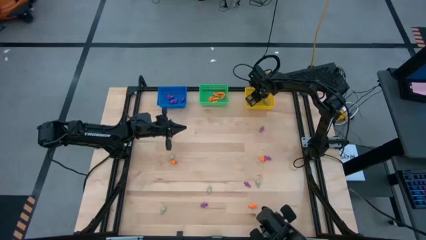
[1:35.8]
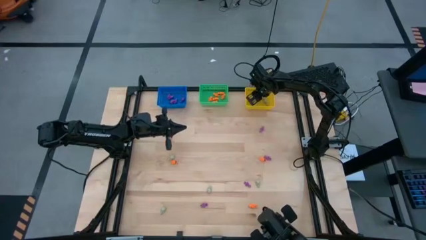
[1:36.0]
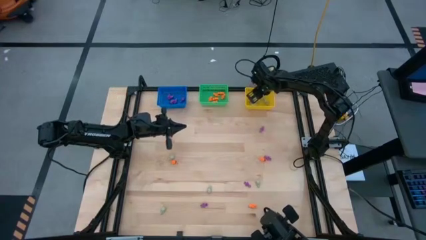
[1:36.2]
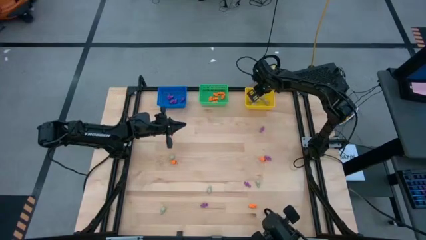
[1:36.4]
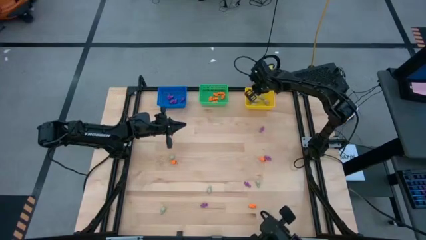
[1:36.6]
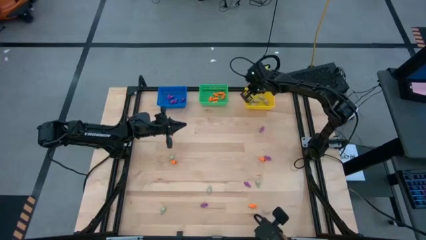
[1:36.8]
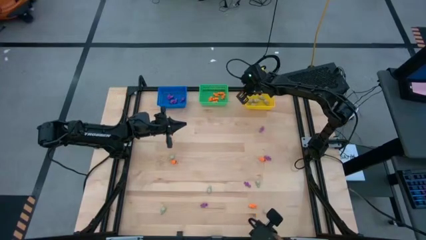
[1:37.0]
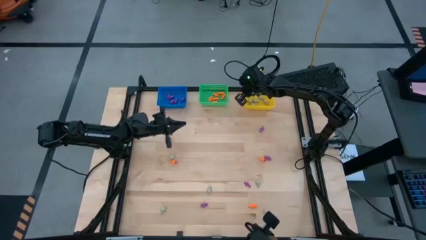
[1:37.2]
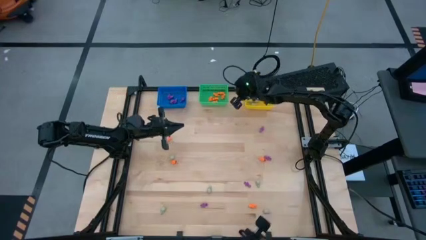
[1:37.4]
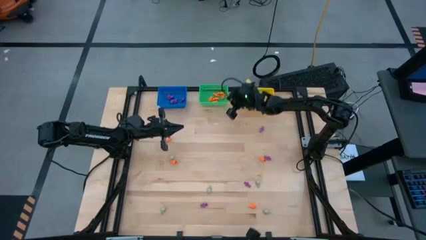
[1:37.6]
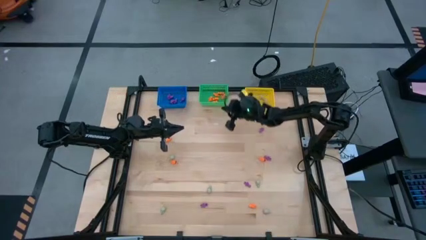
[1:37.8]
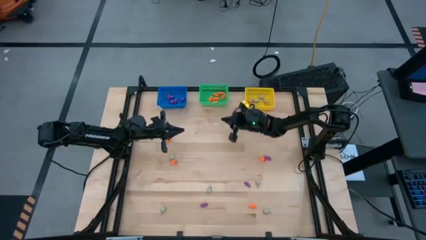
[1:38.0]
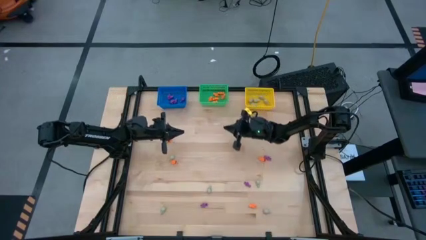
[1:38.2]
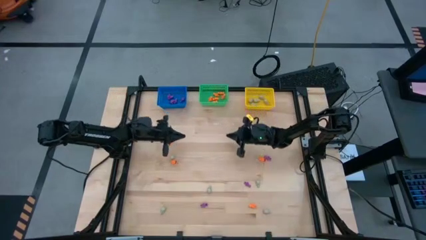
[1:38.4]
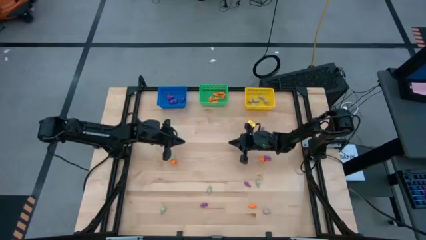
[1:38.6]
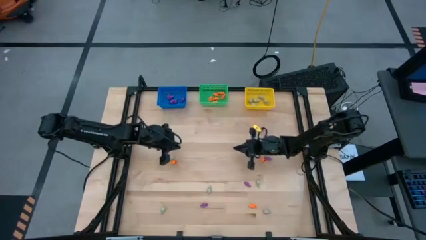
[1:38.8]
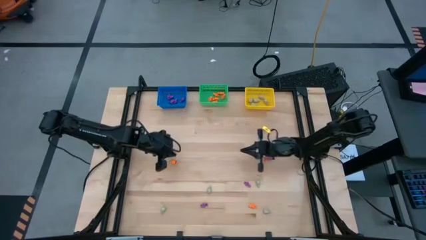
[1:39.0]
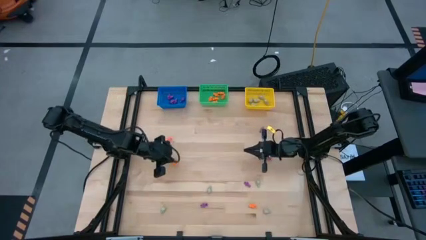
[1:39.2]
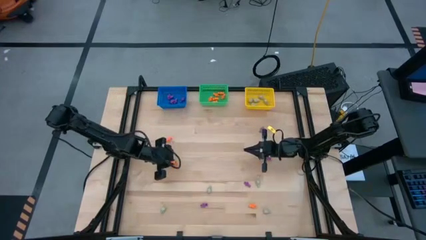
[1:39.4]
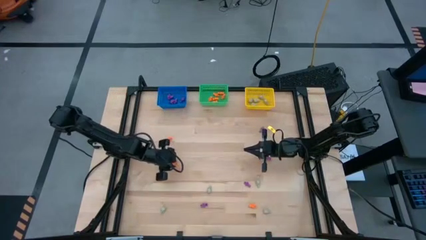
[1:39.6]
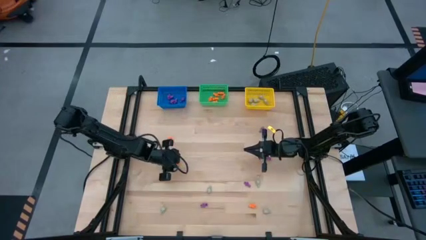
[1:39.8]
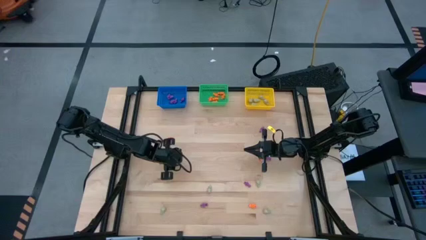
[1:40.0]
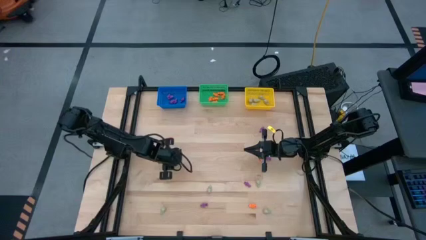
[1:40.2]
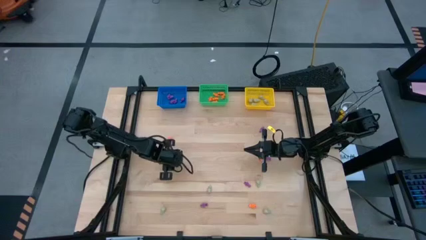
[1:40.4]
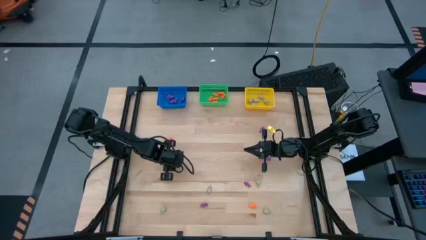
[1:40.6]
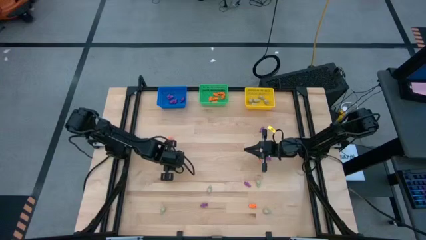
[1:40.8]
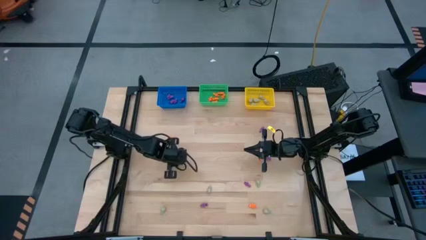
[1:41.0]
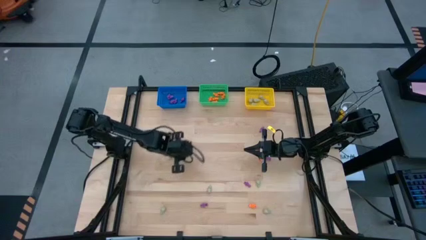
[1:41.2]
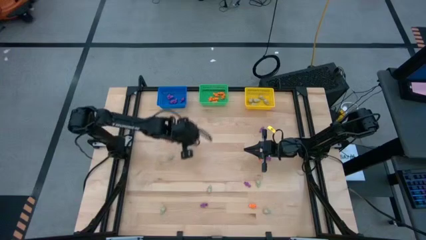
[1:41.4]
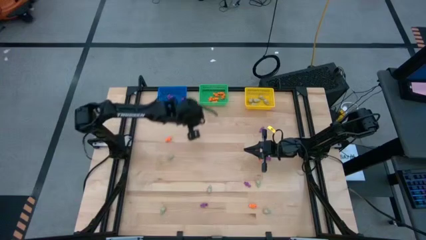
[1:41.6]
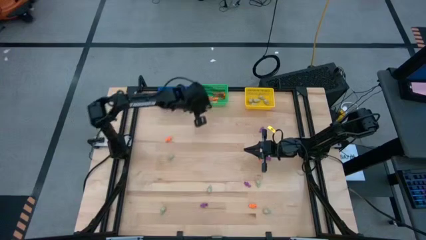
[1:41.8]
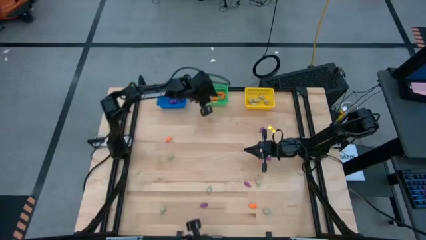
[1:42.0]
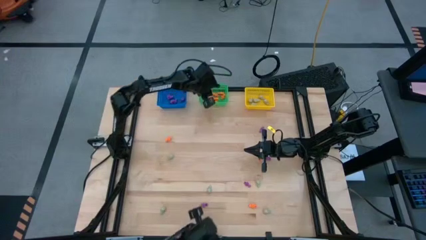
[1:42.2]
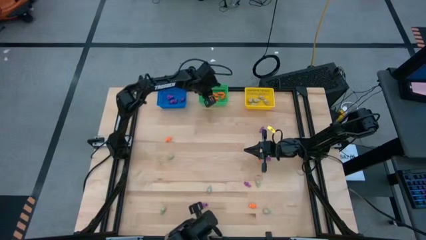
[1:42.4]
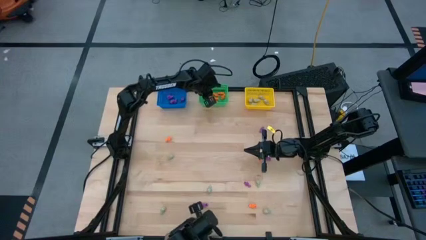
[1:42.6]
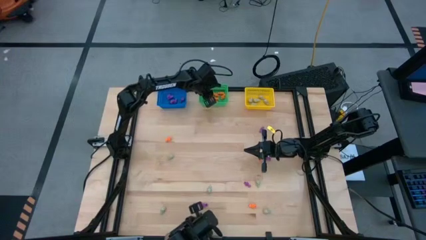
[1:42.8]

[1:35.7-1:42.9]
Task: Sort Halloween decoration
Put the orange skeleton toy into the green basket

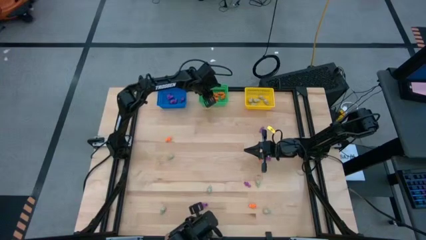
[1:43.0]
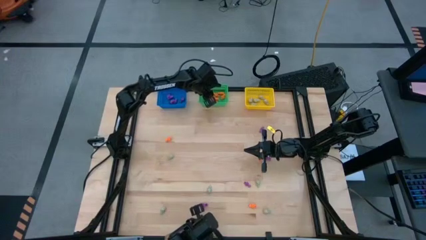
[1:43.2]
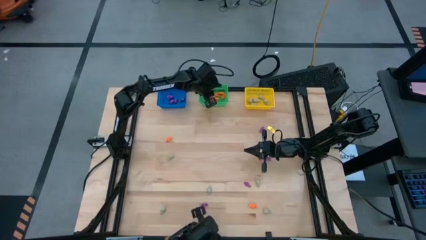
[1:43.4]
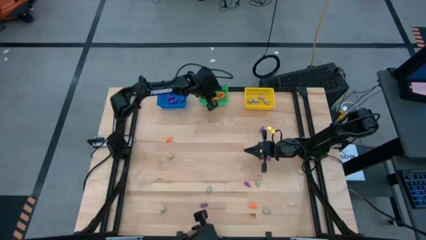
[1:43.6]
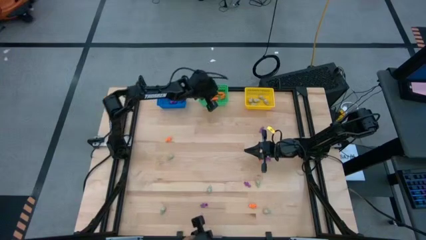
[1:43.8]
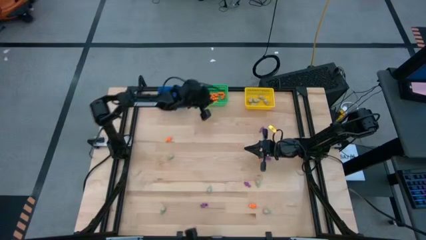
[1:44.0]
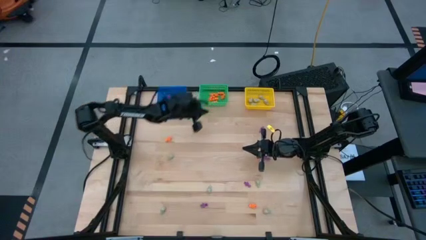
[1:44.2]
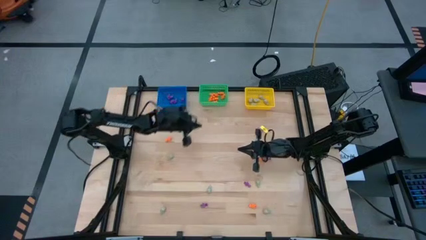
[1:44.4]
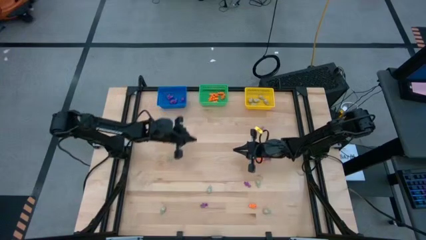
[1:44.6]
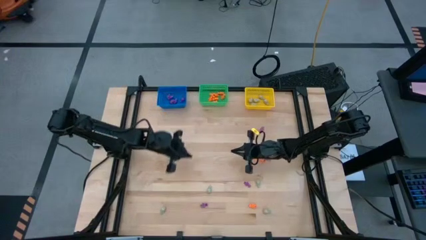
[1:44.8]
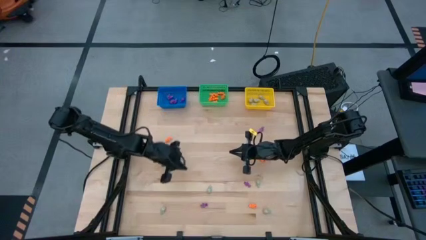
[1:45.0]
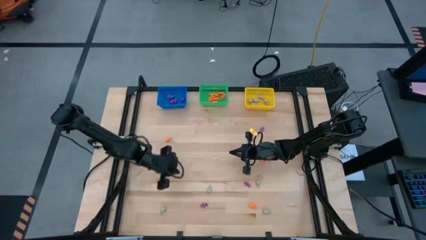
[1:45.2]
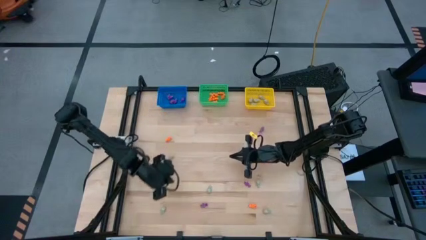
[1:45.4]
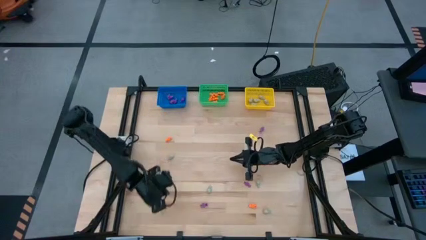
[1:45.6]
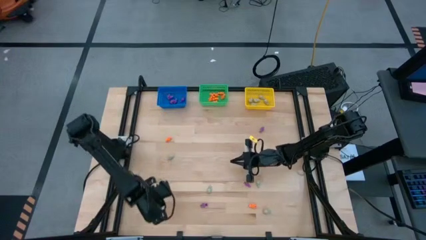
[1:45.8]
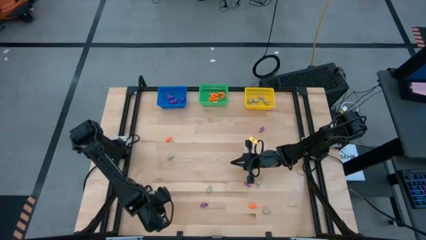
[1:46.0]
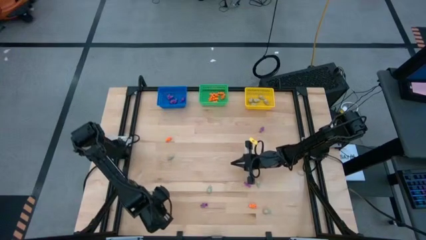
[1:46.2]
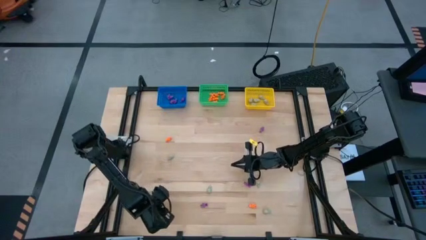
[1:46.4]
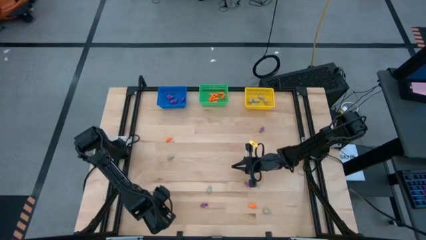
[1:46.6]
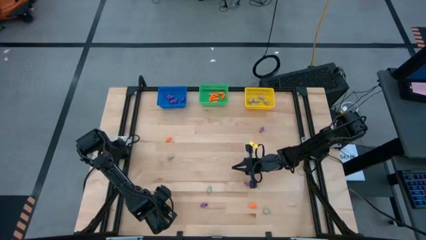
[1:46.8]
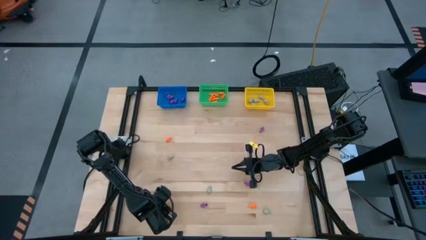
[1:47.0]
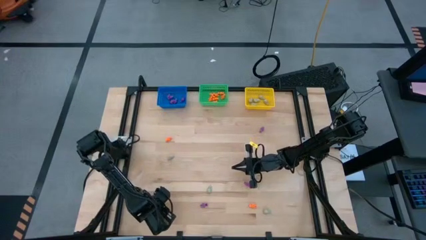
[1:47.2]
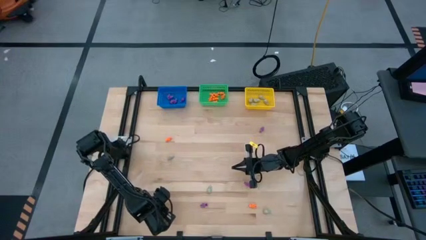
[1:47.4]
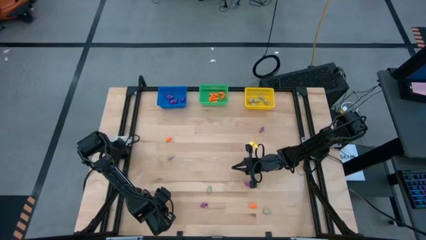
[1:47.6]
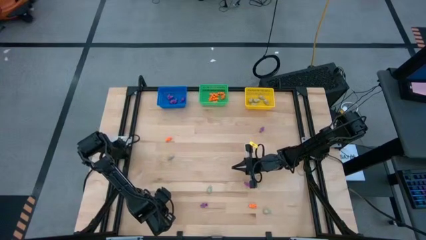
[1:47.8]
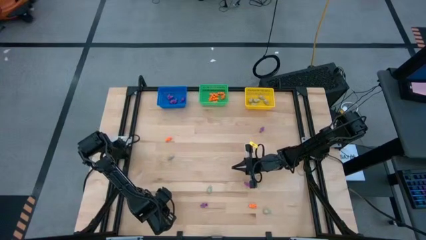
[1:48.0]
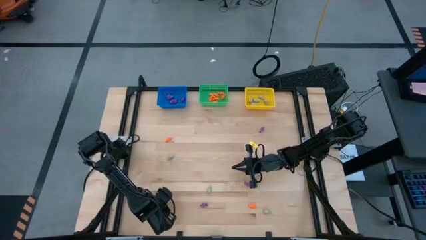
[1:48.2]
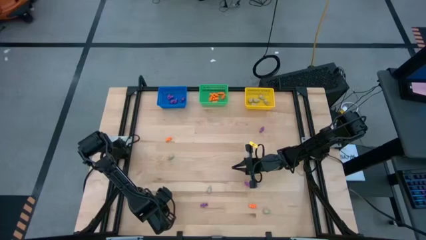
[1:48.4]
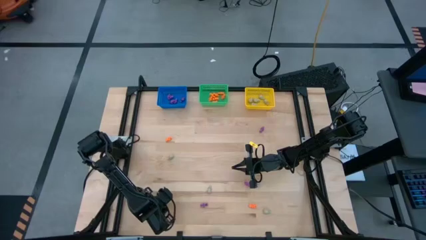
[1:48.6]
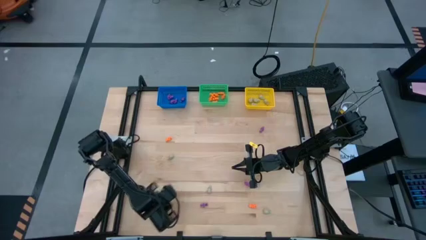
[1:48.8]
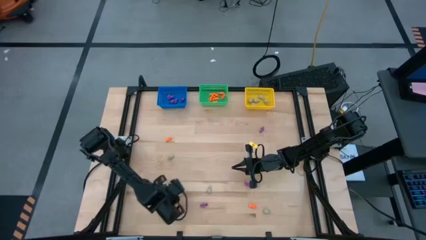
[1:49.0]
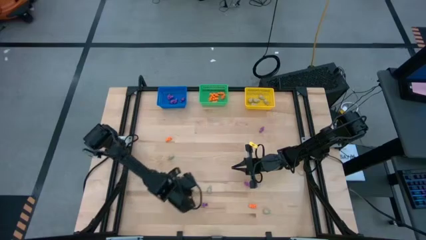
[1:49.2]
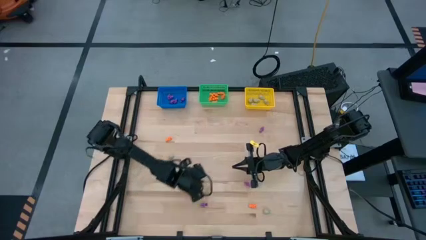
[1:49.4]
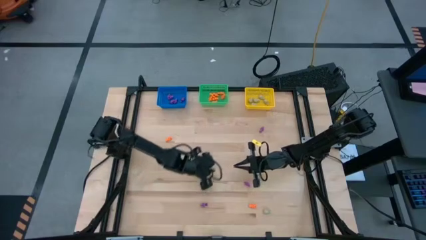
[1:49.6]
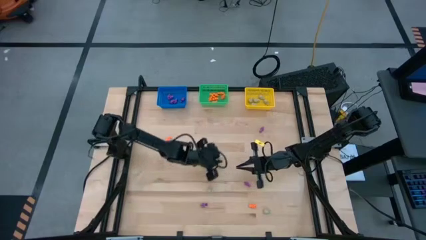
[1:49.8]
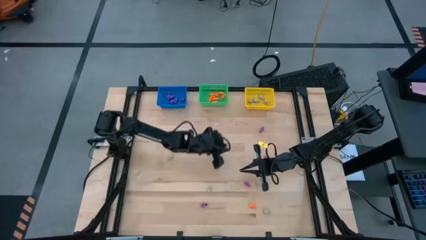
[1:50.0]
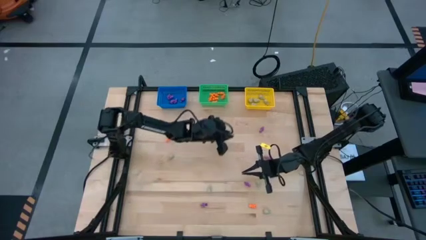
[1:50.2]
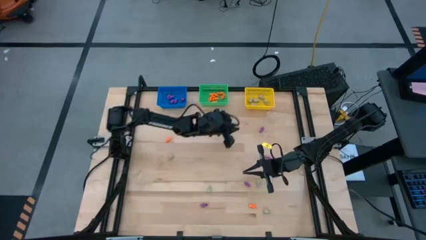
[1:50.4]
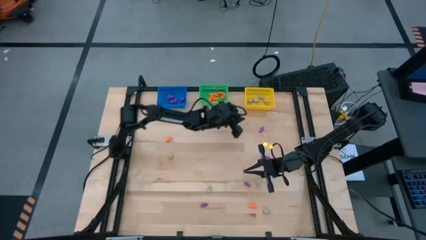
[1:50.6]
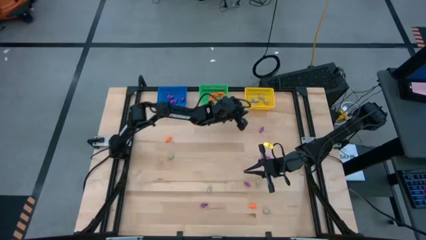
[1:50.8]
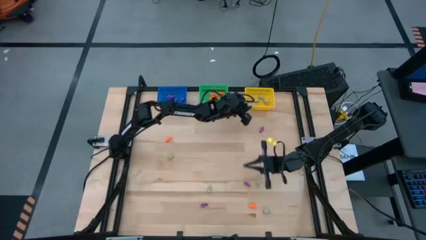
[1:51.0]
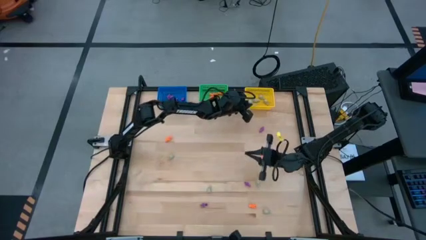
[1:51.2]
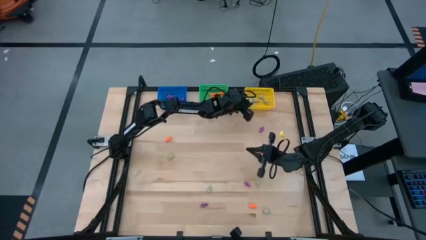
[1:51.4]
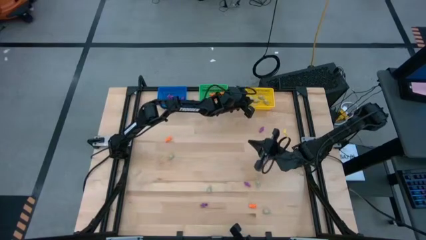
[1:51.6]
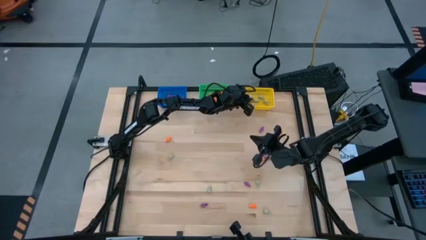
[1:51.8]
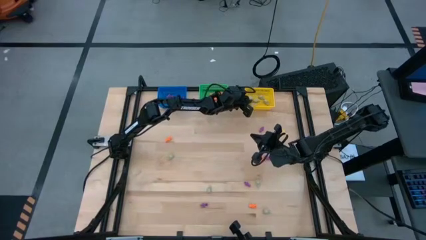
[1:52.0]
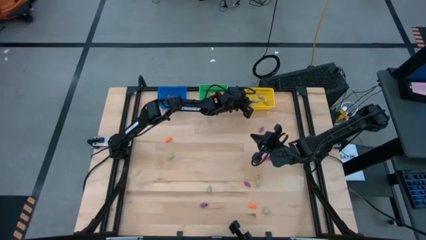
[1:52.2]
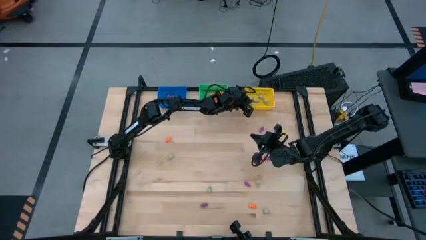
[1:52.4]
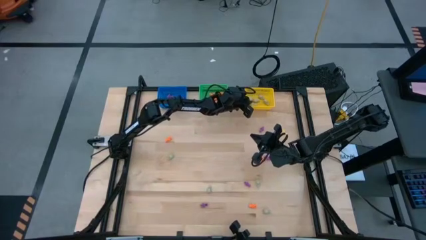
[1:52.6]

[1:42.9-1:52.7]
Put the grey skull toy into the yellow basket
